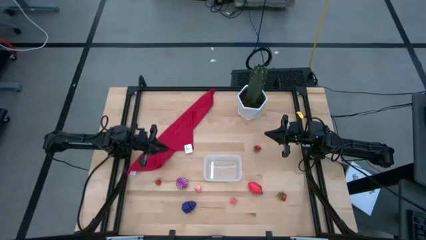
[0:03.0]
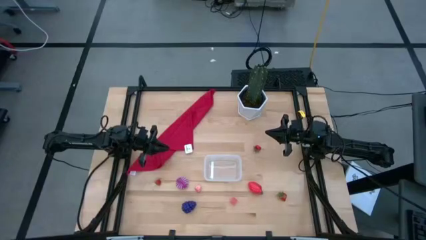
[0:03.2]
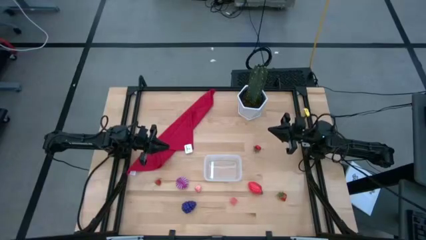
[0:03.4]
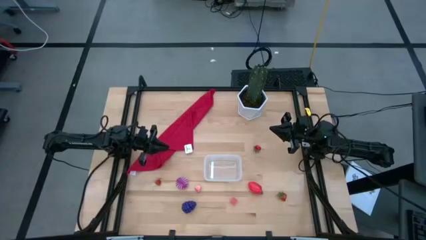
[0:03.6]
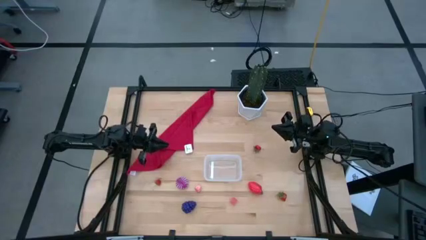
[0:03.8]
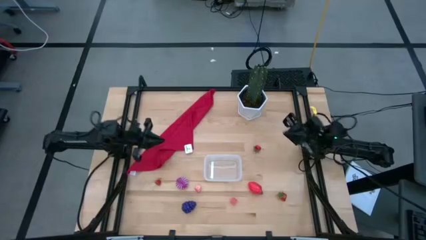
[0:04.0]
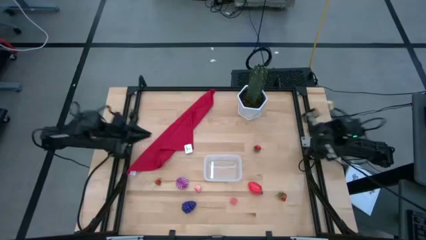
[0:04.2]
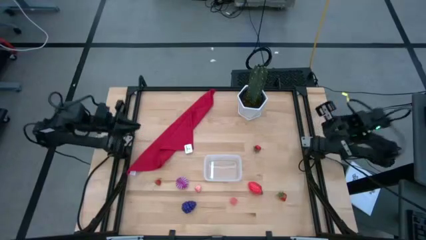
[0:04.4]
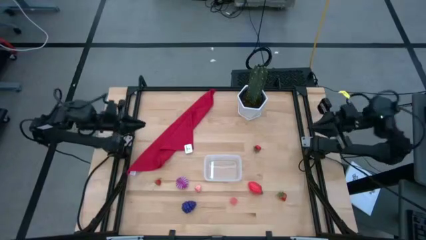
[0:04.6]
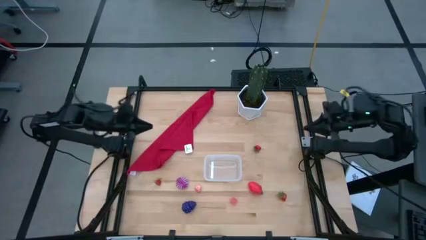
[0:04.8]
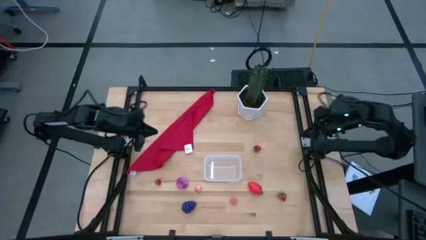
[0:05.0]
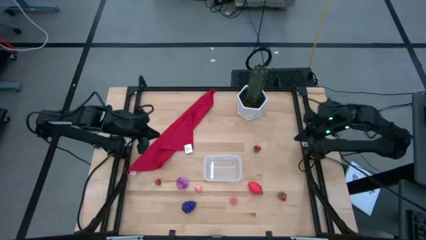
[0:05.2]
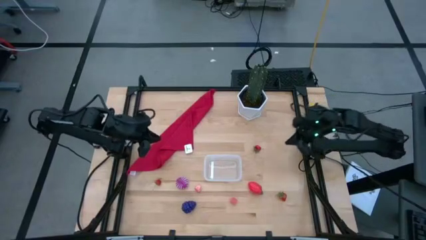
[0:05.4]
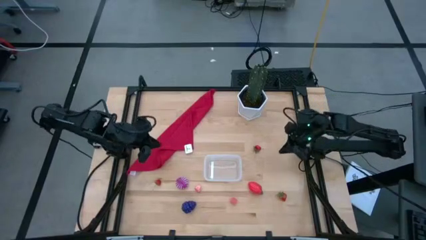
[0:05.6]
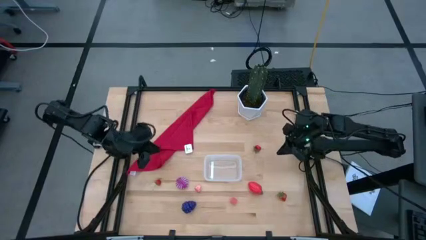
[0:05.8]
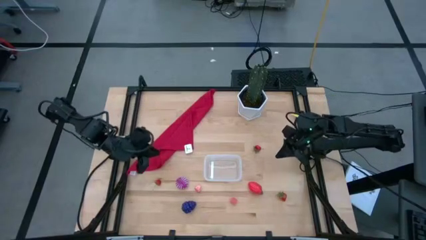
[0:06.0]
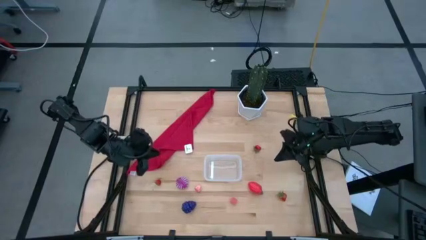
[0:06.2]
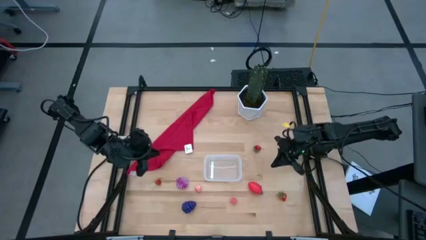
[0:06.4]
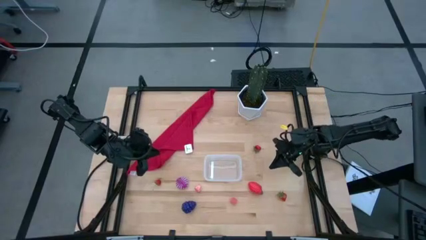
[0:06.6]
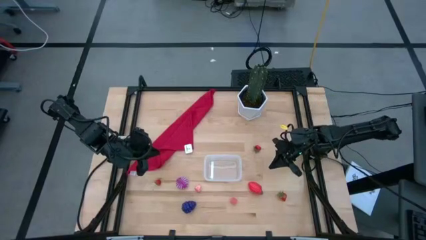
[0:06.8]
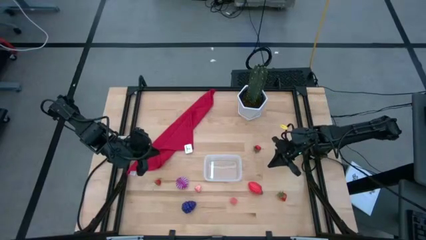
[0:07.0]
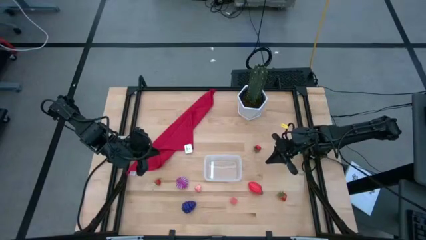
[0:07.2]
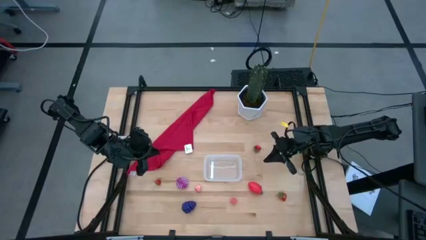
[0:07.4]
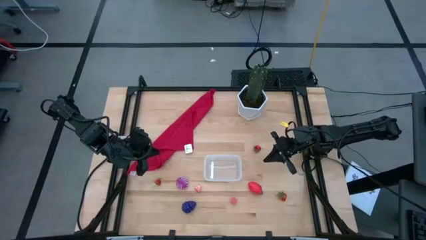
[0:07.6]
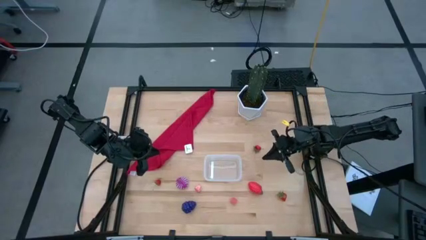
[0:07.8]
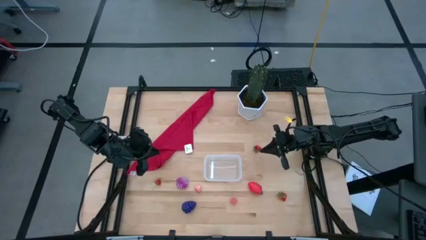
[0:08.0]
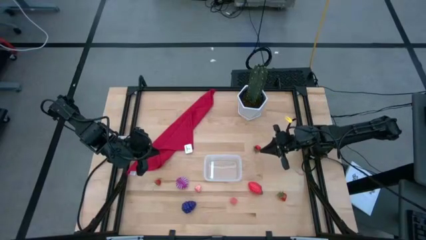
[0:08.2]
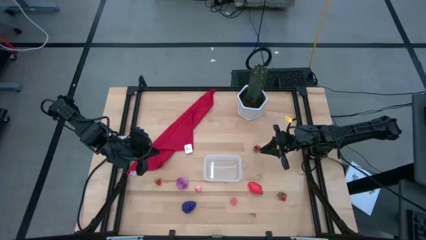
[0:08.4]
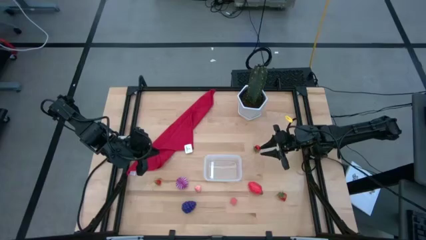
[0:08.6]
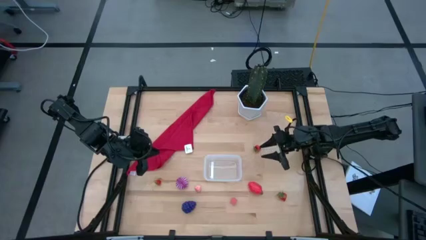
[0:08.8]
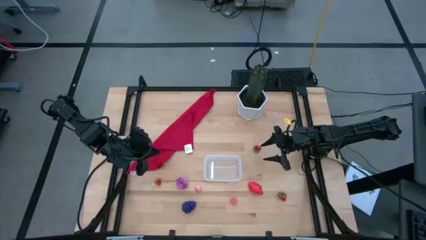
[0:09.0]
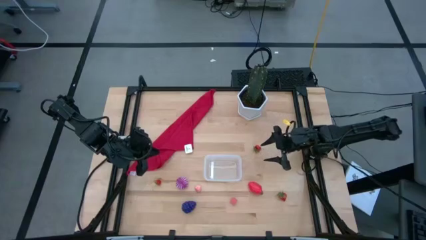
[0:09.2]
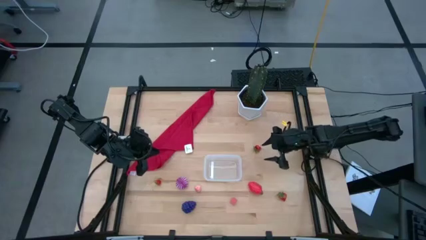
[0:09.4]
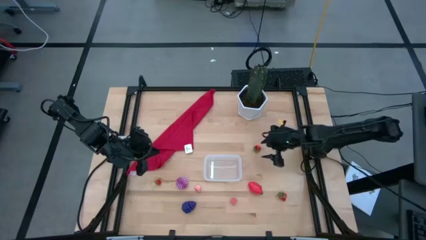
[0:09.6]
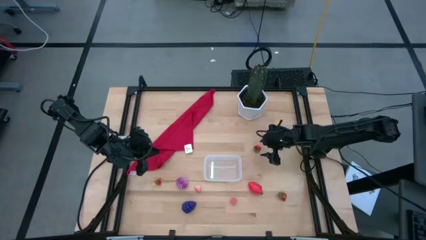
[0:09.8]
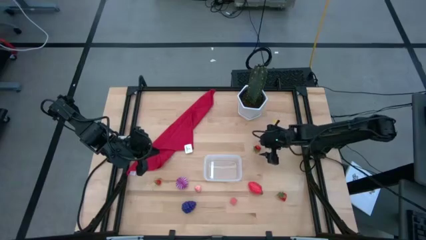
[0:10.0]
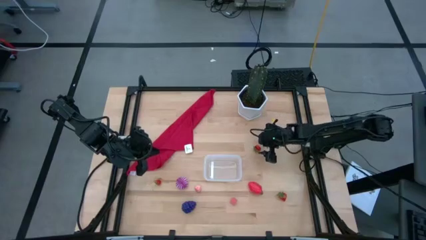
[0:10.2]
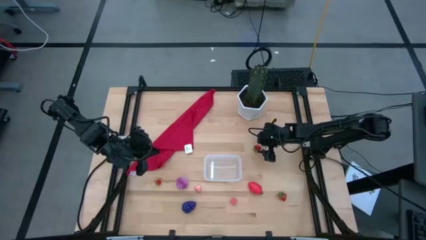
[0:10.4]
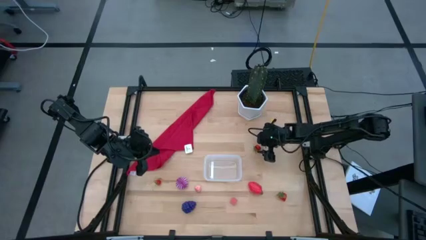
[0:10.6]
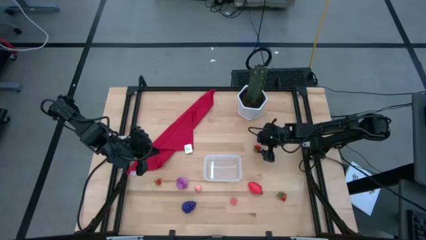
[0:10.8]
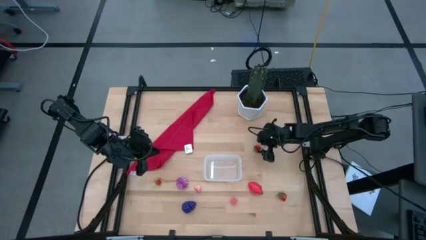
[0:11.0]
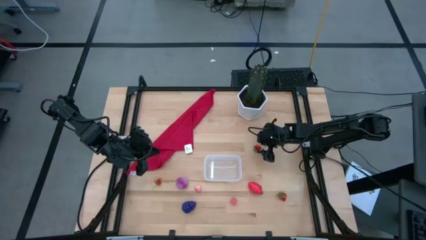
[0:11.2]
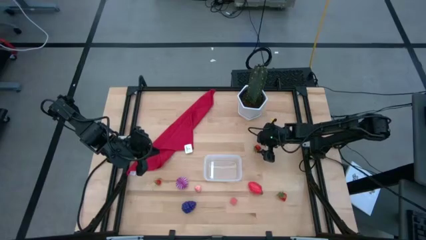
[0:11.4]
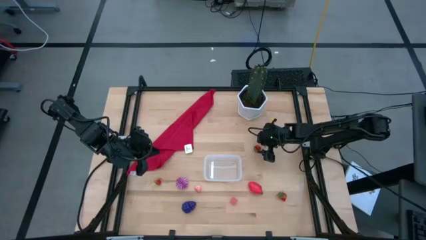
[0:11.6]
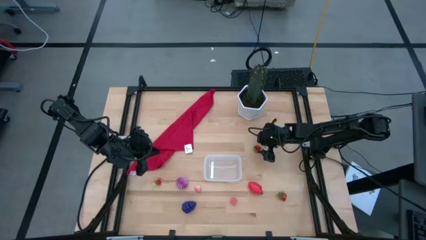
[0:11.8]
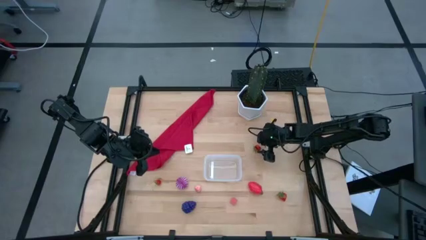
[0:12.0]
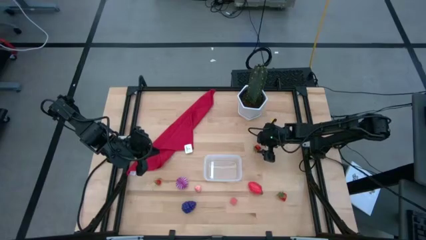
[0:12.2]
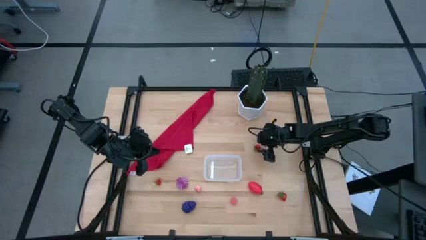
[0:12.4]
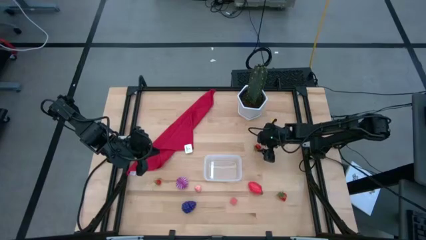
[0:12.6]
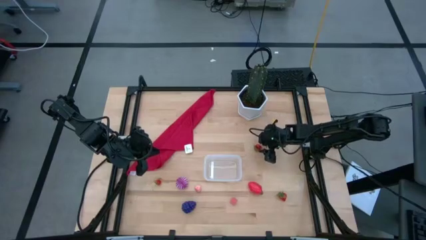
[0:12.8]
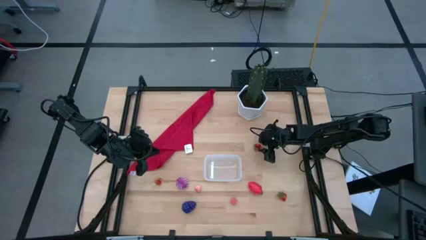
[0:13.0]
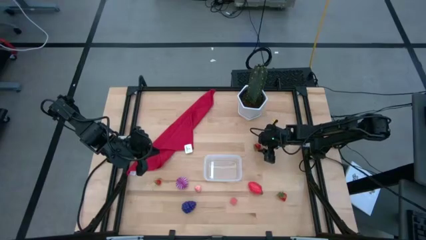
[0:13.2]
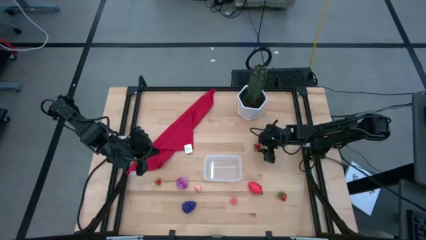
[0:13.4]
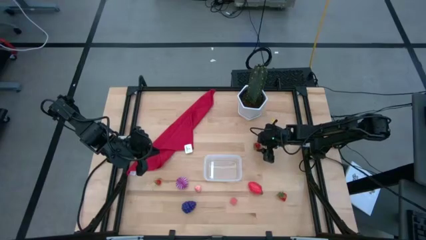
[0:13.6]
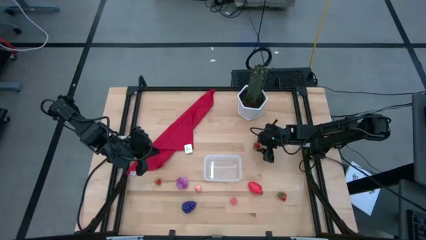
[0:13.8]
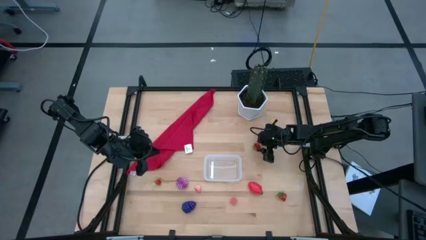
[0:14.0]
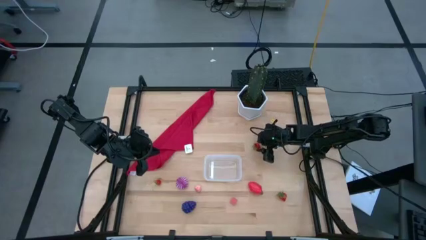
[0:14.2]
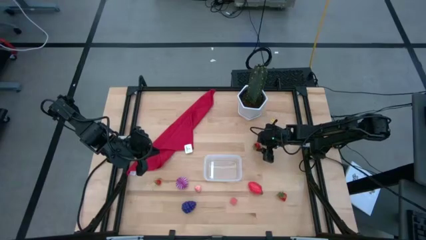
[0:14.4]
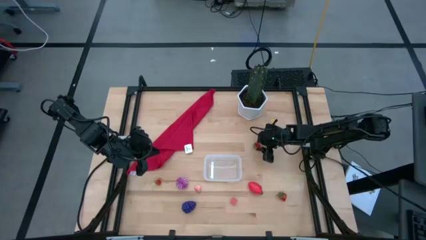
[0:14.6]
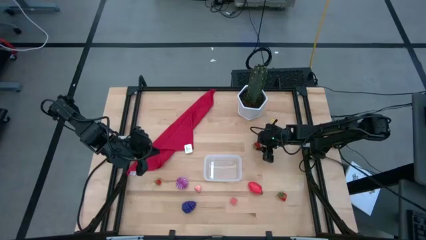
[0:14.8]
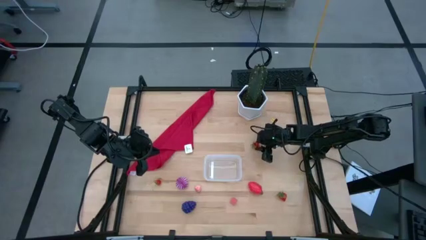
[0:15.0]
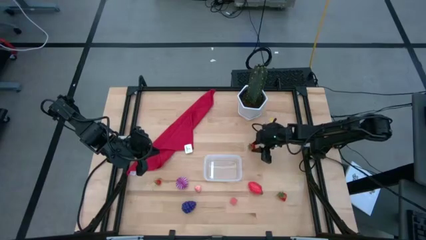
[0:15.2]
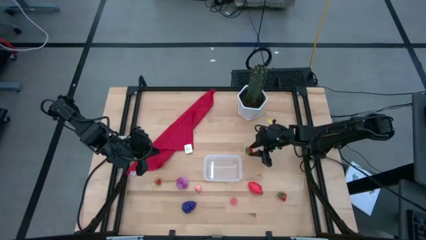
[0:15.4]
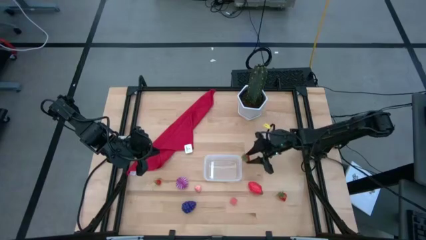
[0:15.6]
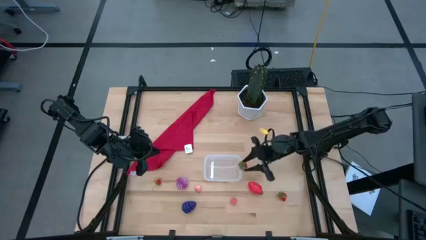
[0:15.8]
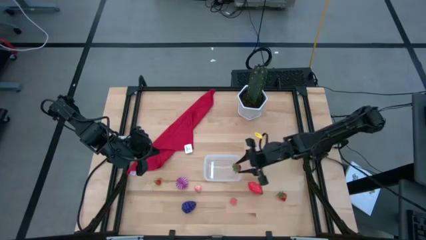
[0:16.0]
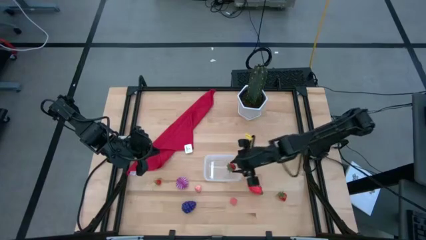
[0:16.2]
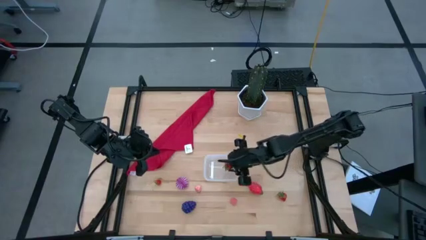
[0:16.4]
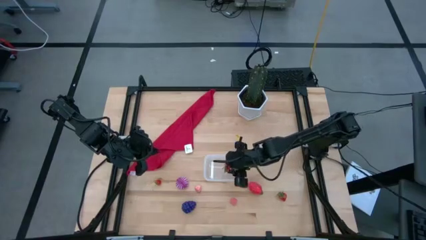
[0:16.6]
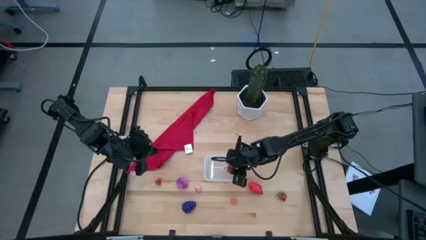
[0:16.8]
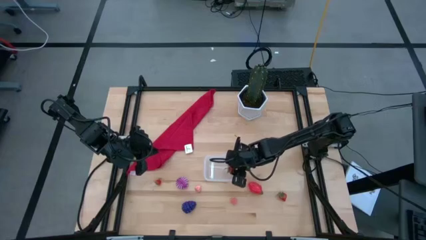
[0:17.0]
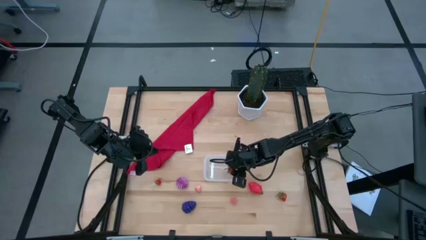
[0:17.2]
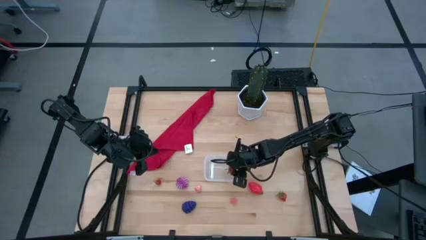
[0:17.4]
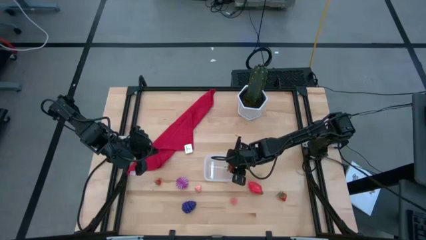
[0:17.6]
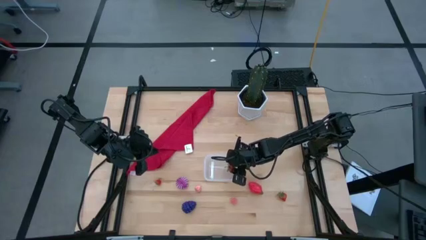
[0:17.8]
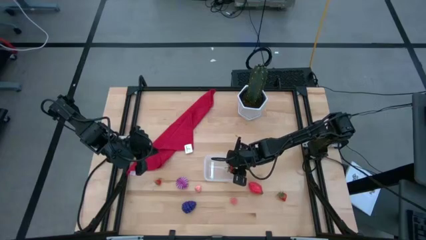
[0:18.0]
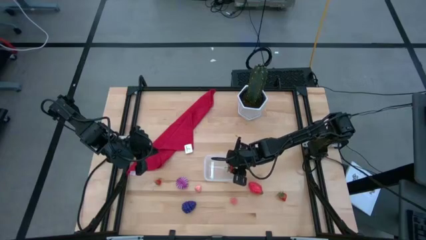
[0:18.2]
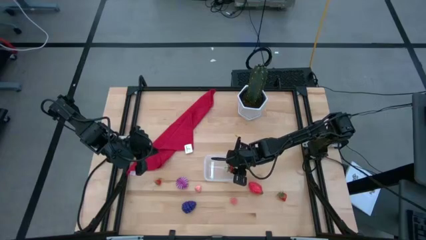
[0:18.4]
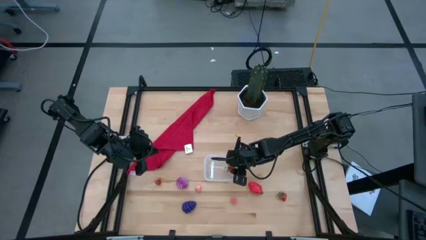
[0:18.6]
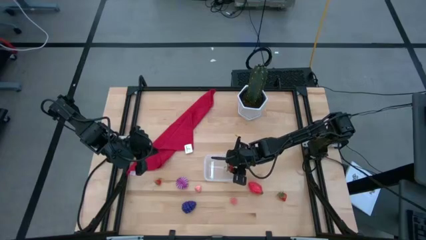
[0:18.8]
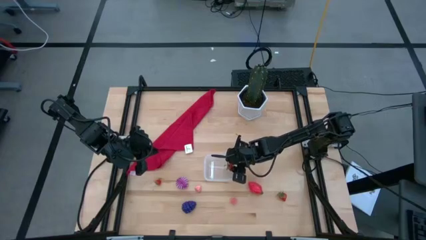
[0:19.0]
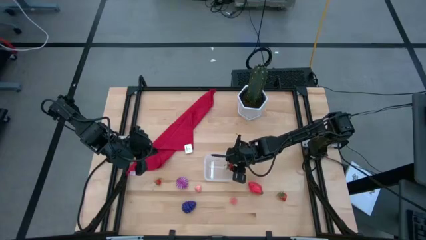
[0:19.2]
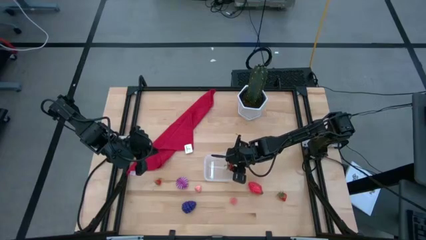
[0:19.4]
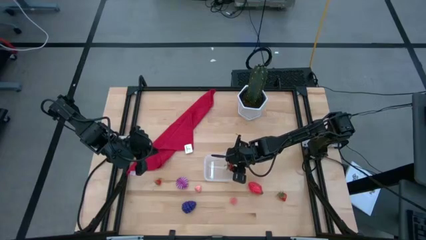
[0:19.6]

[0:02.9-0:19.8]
Task: Pick and placing Produce into tupperware
Put the top red strawberry into the transparent bin
